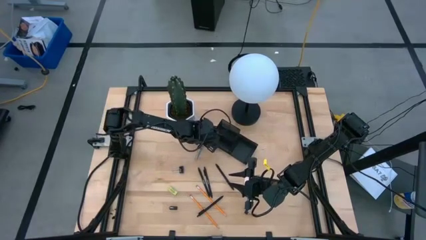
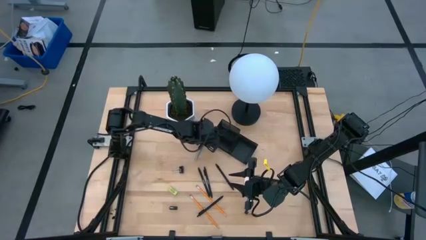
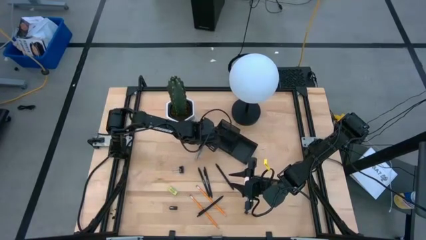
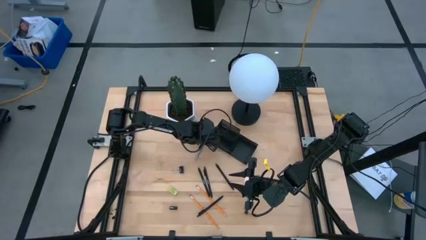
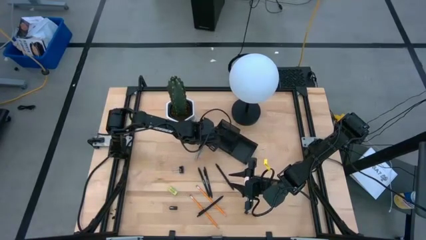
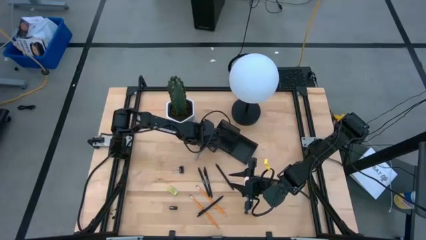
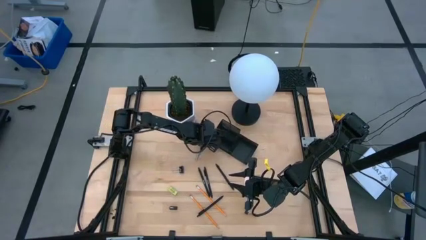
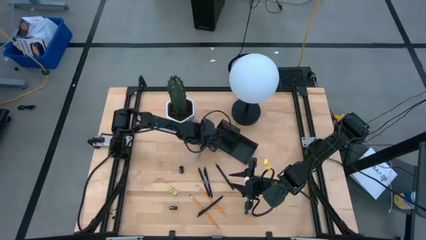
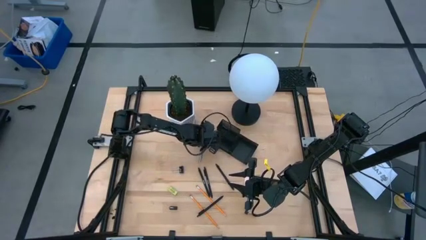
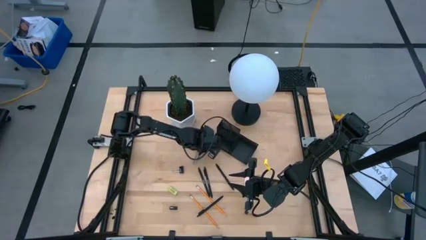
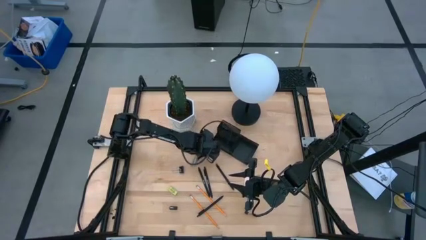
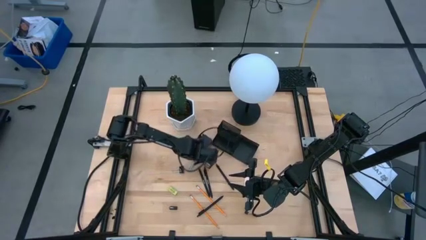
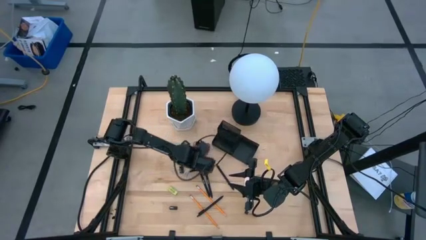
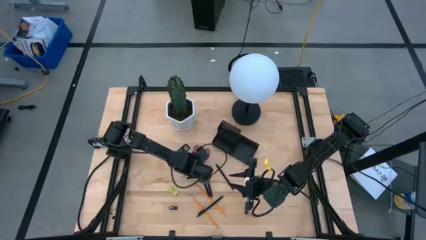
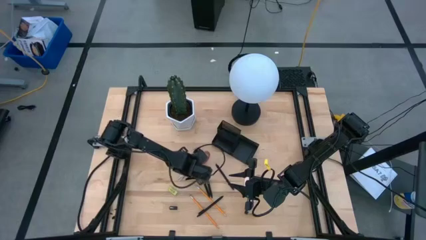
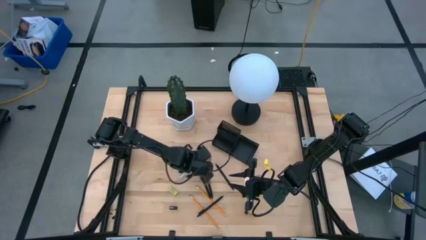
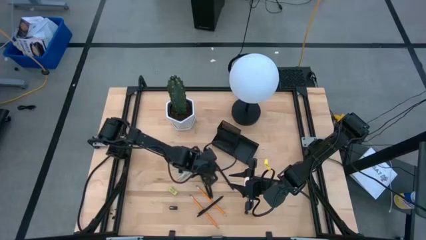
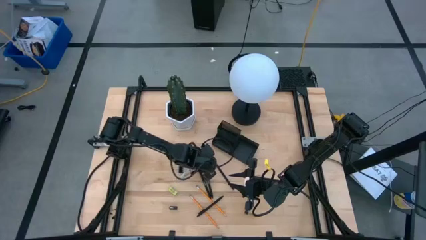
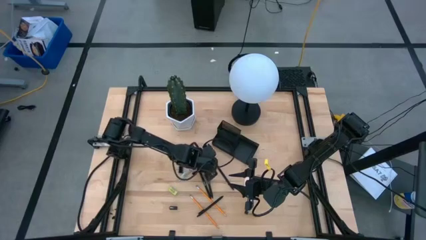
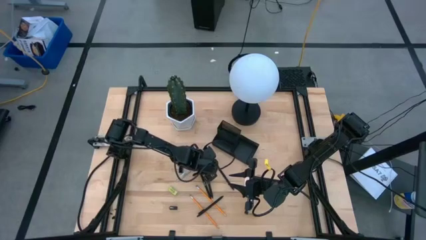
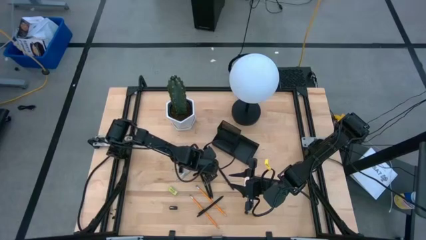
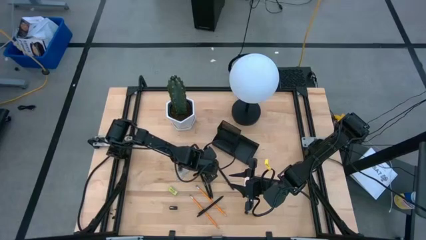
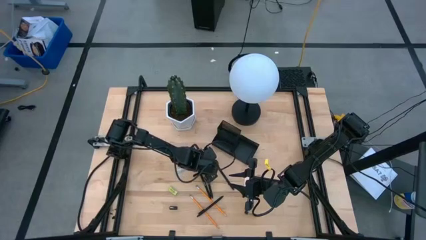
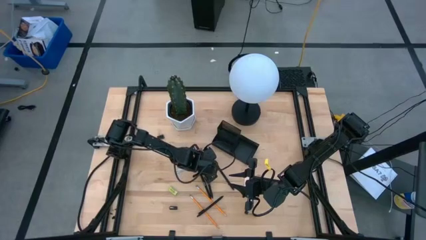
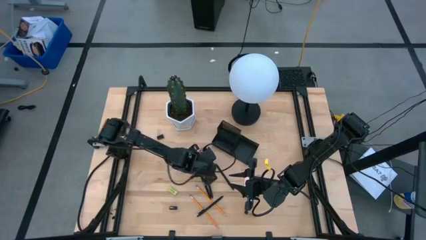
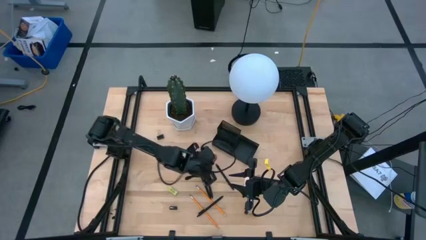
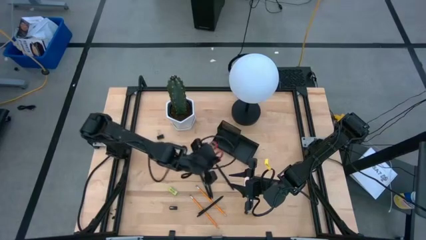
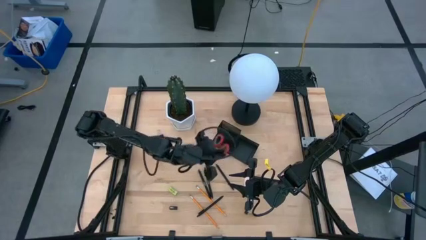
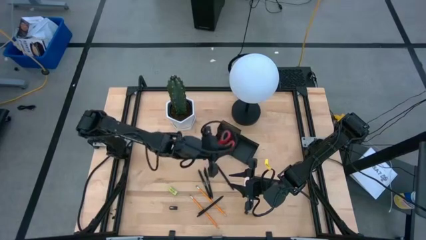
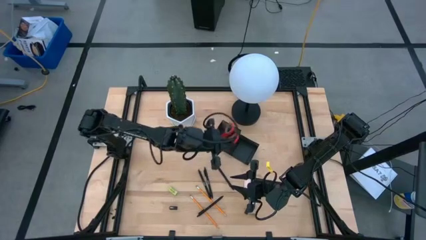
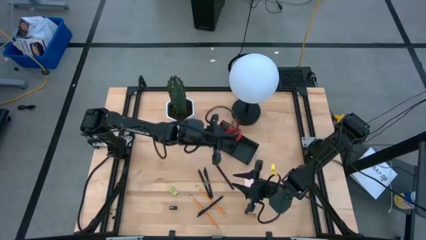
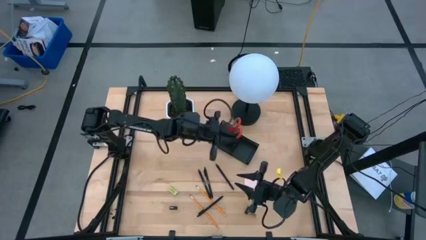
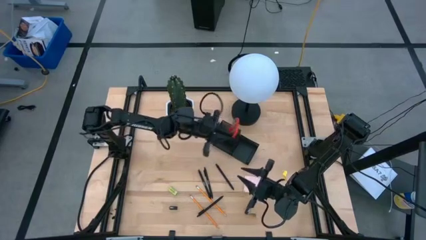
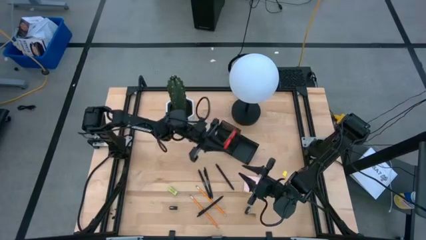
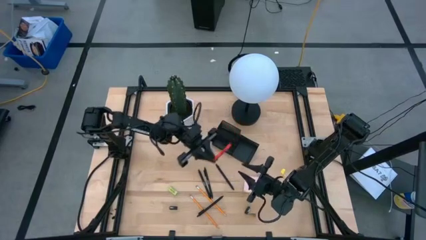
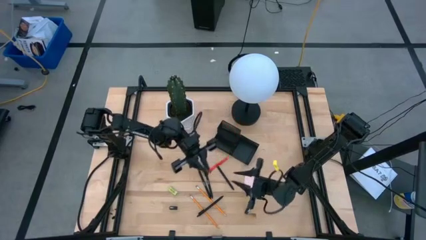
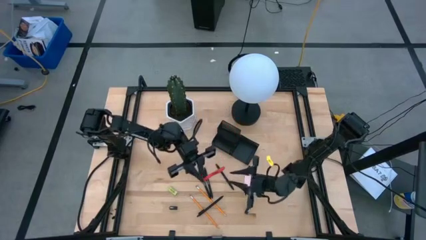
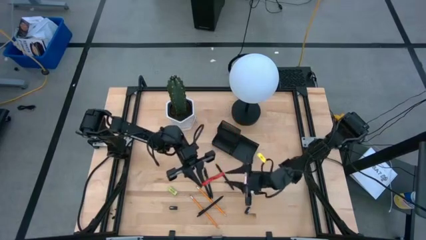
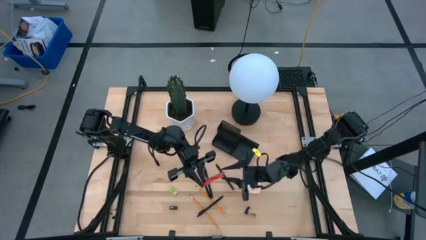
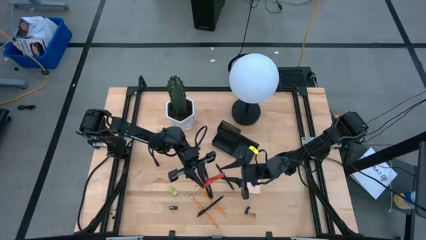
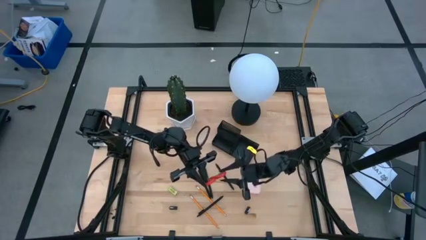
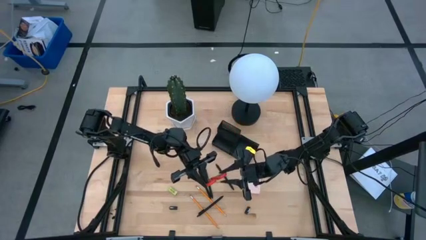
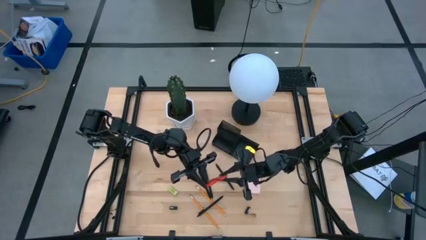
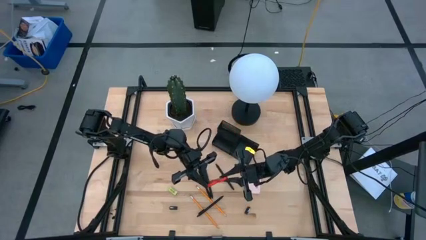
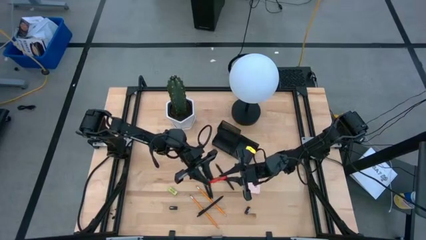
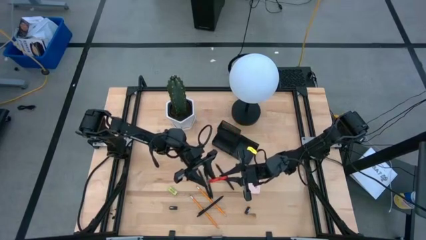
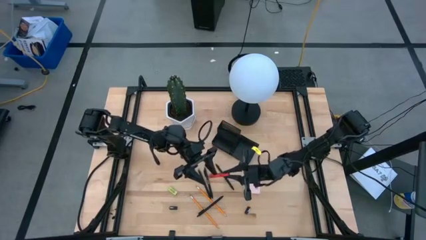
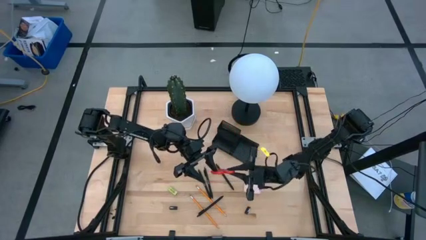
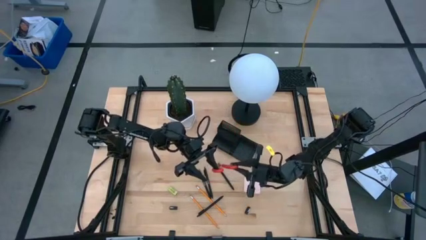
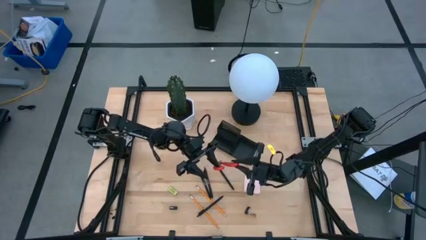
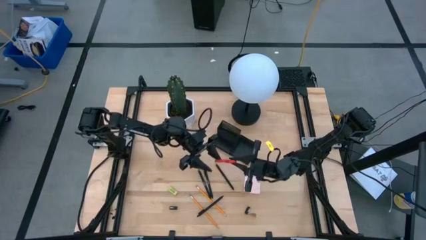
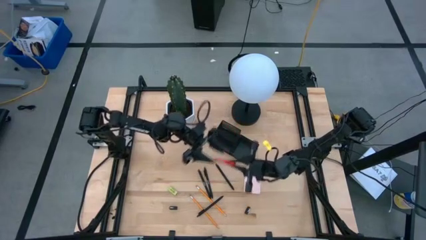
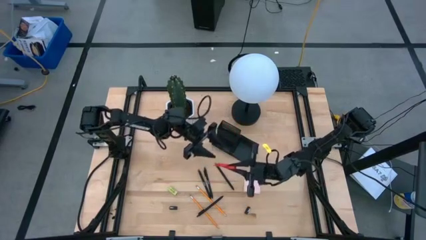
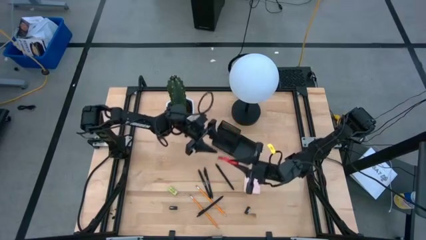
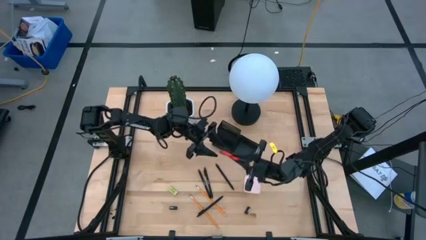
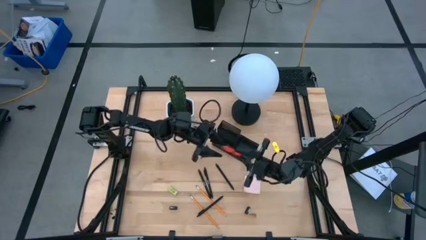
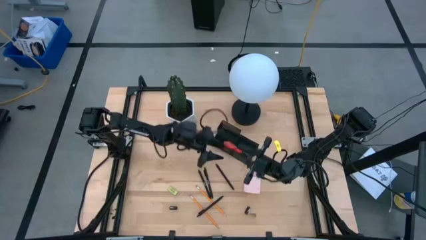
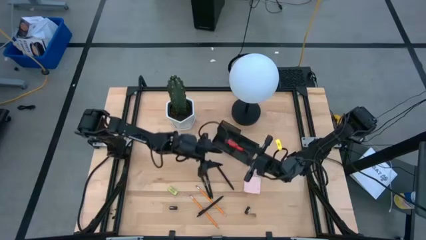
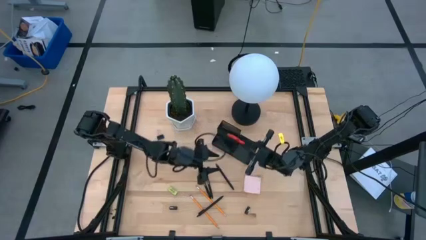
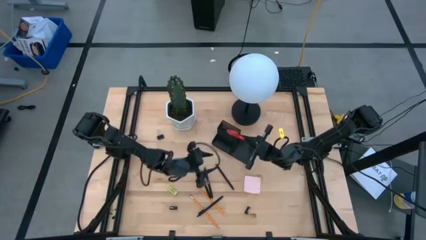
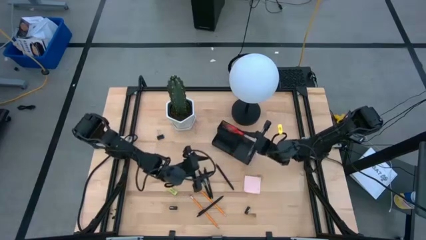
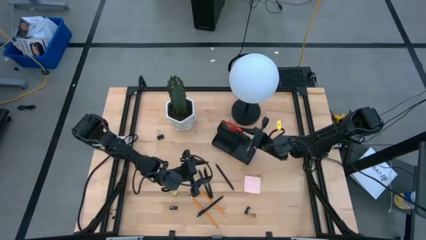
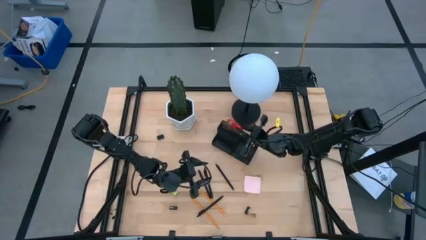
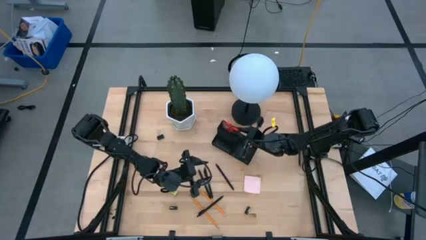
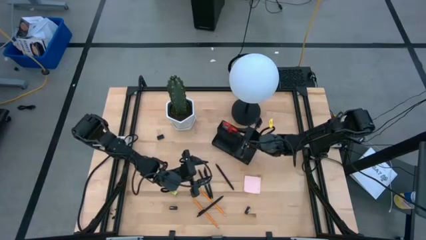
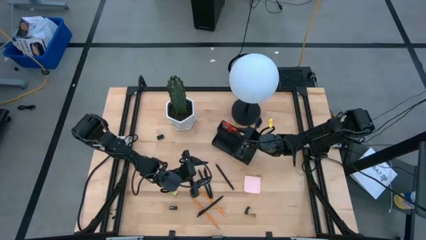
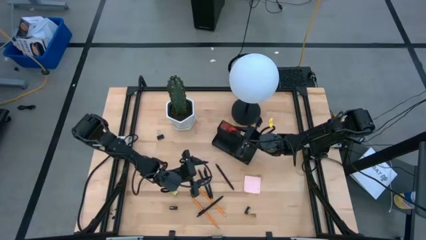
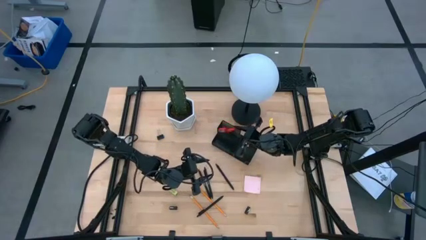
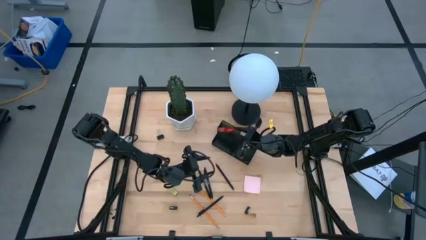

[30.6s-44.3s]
Task: Pick and place office supplies into organizer
Put the red scissors into the black desk organizer
